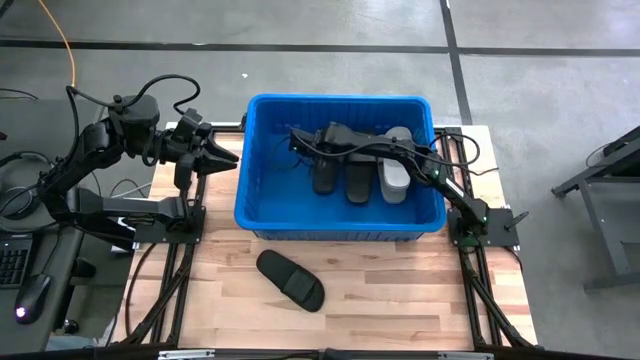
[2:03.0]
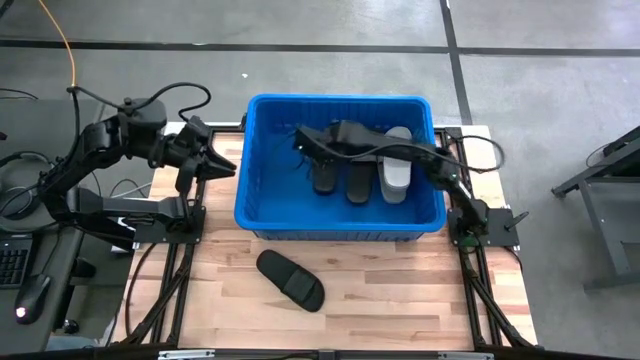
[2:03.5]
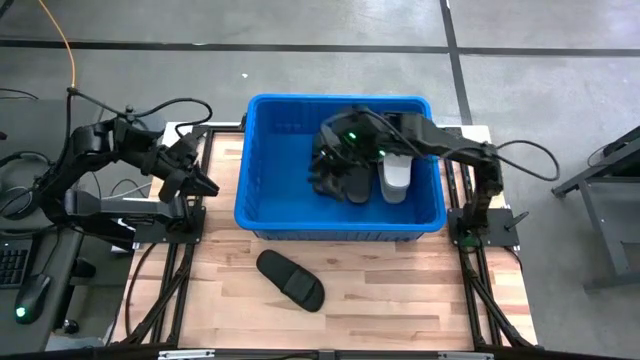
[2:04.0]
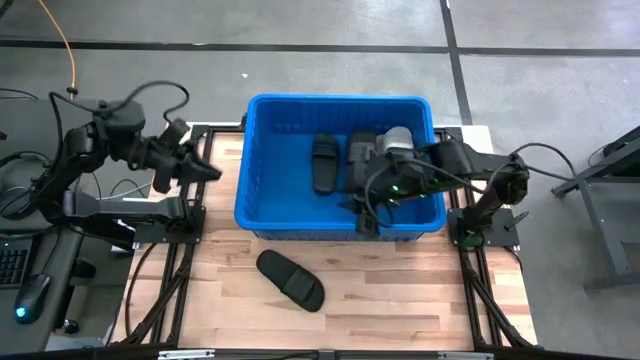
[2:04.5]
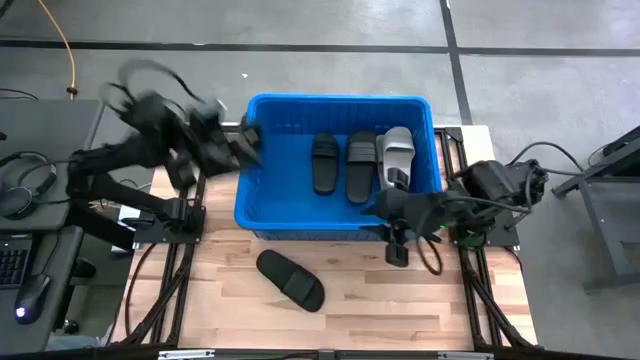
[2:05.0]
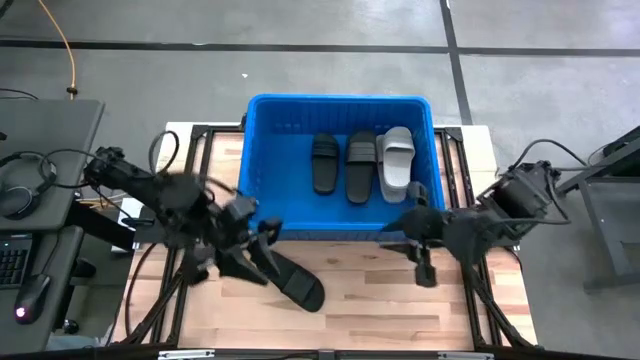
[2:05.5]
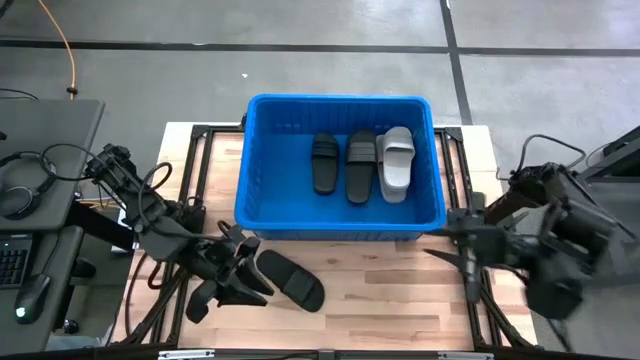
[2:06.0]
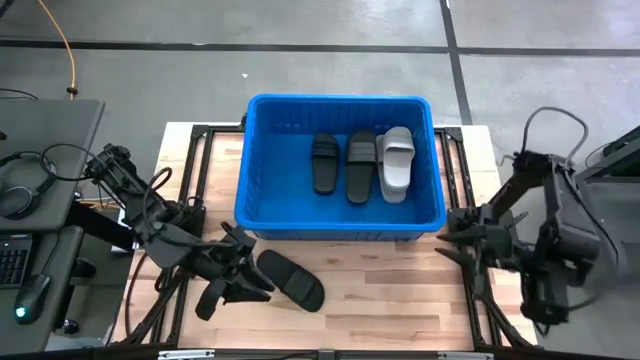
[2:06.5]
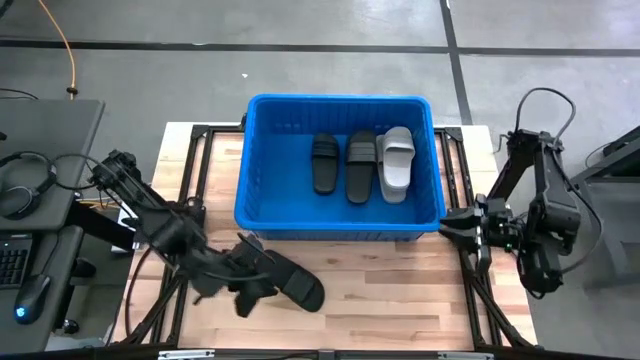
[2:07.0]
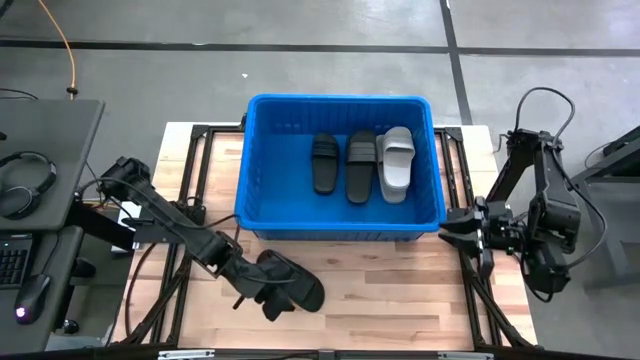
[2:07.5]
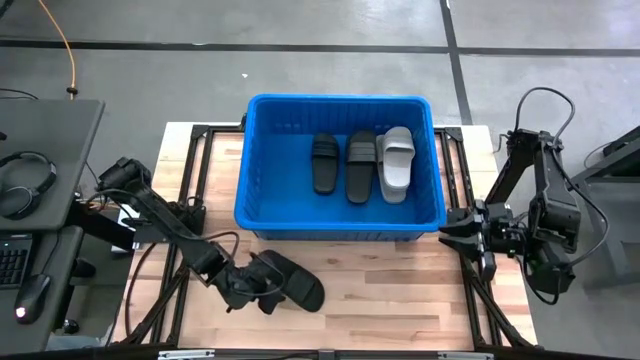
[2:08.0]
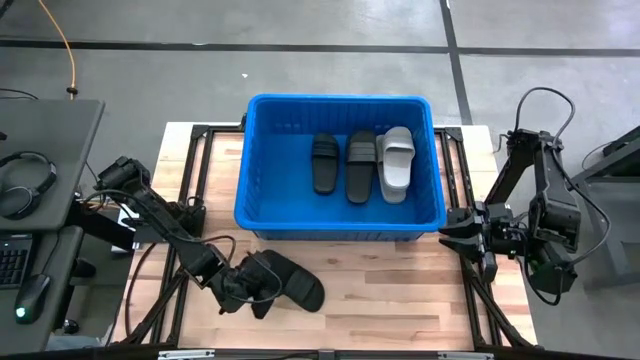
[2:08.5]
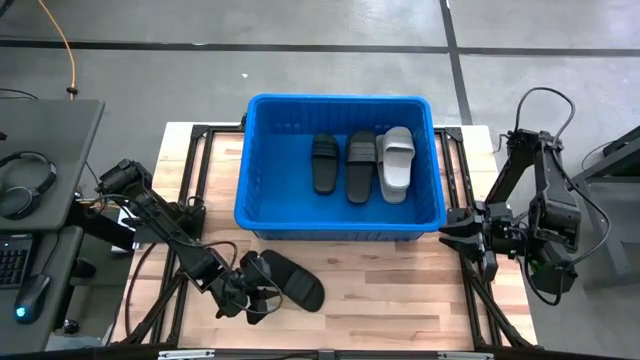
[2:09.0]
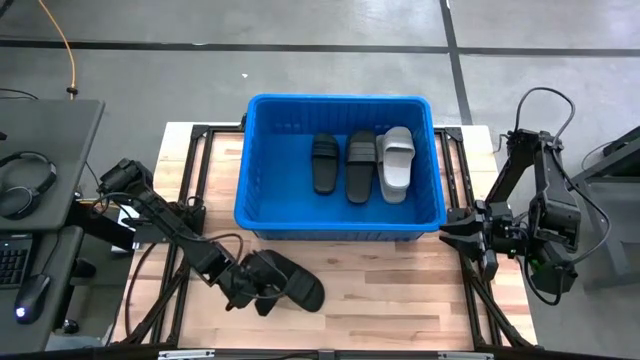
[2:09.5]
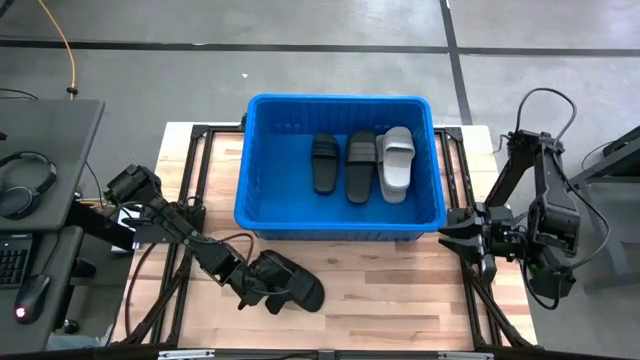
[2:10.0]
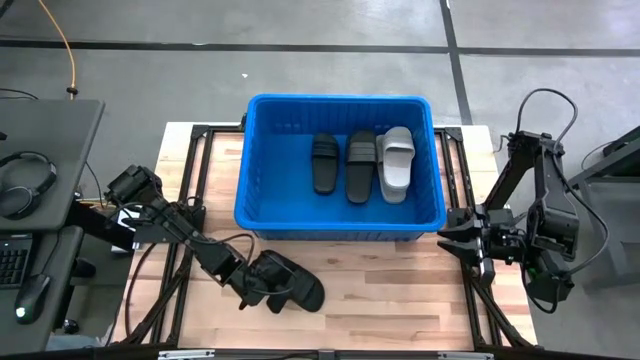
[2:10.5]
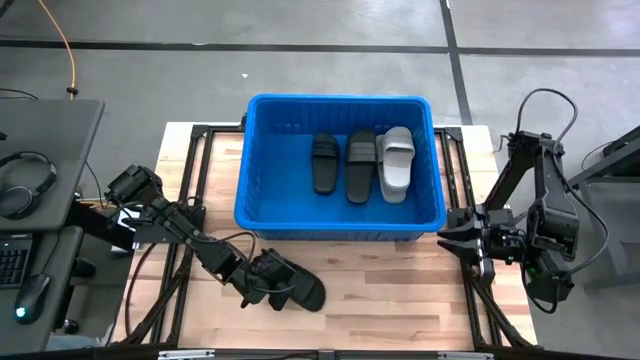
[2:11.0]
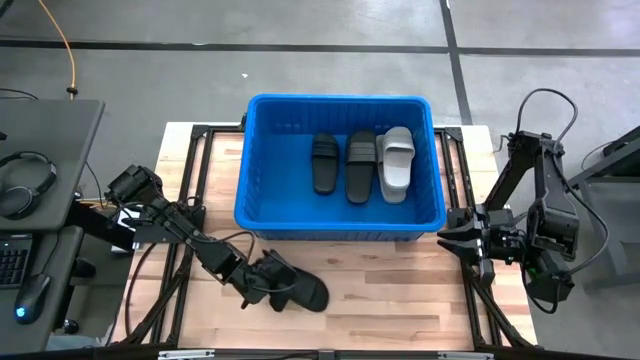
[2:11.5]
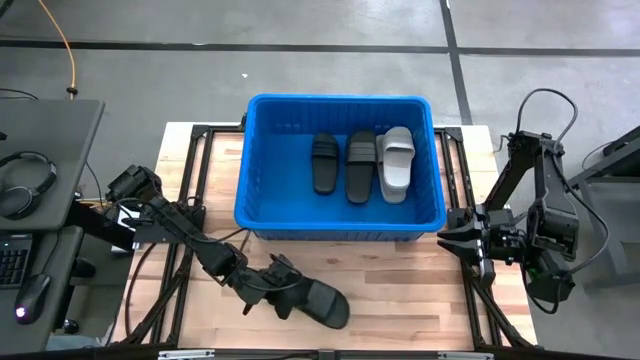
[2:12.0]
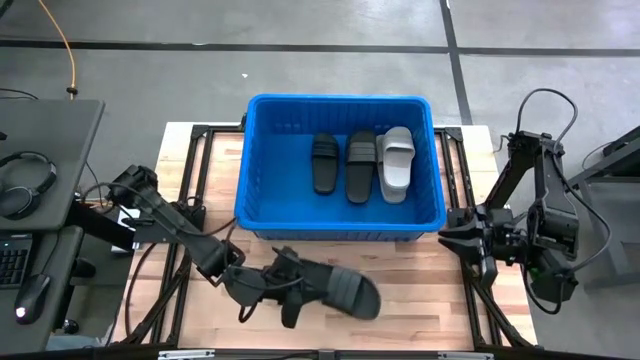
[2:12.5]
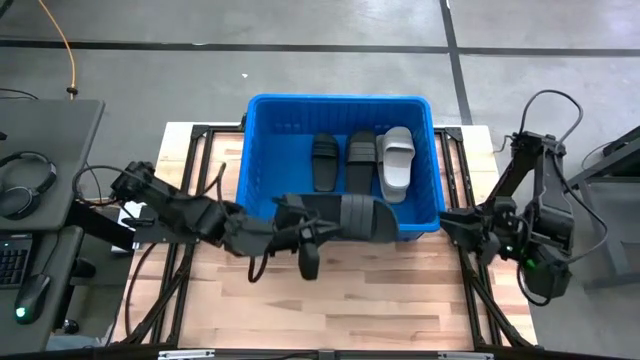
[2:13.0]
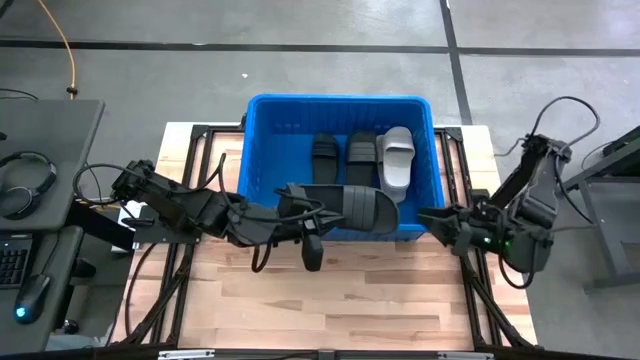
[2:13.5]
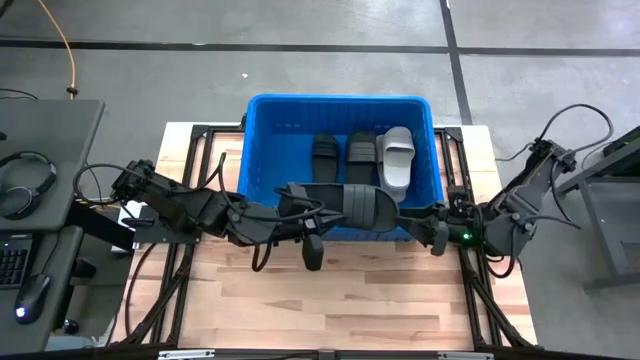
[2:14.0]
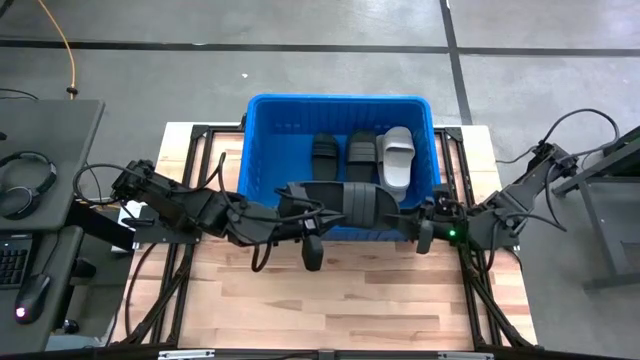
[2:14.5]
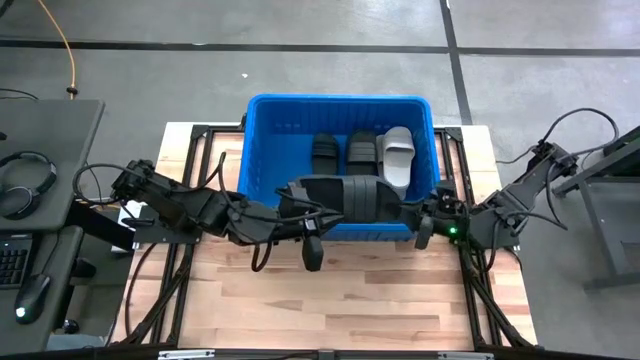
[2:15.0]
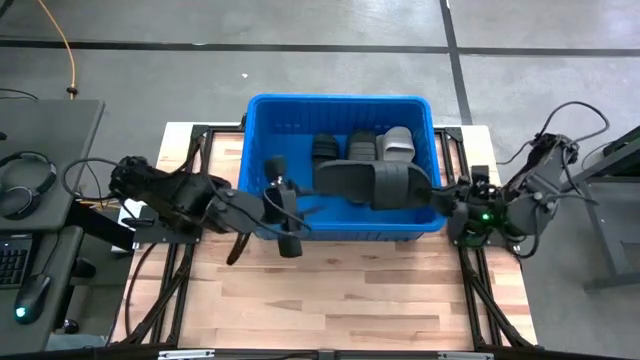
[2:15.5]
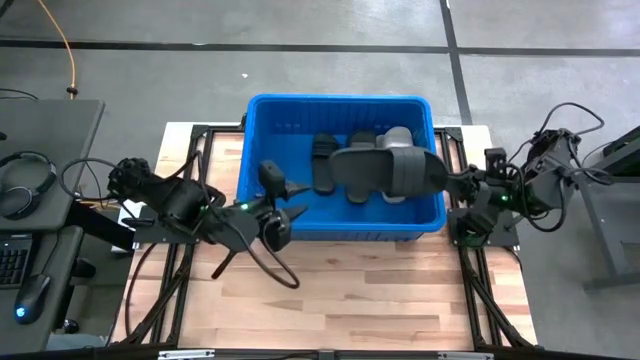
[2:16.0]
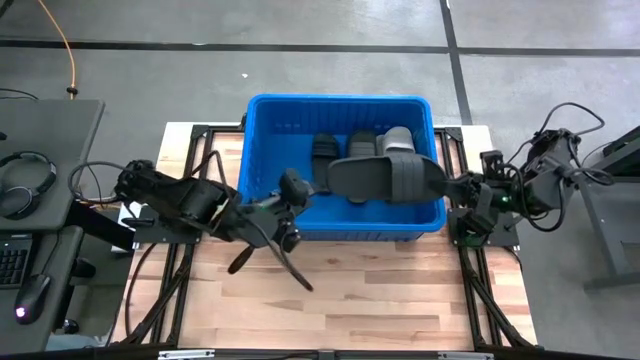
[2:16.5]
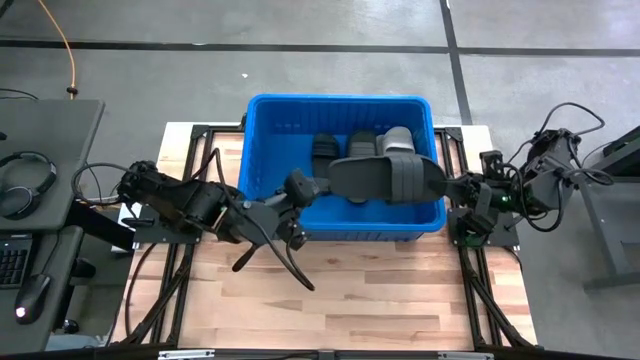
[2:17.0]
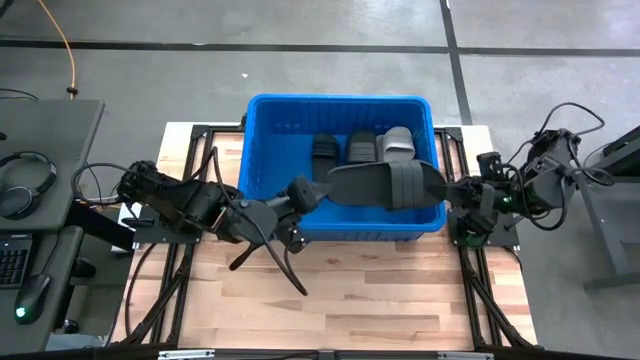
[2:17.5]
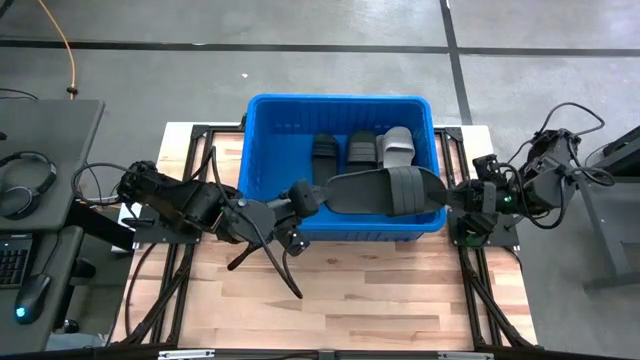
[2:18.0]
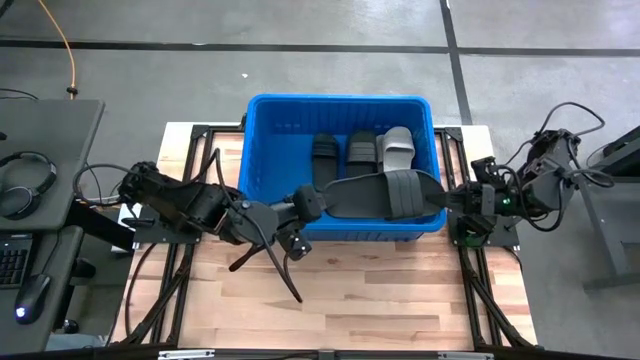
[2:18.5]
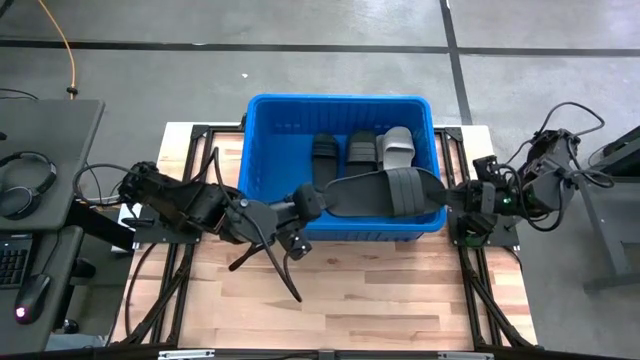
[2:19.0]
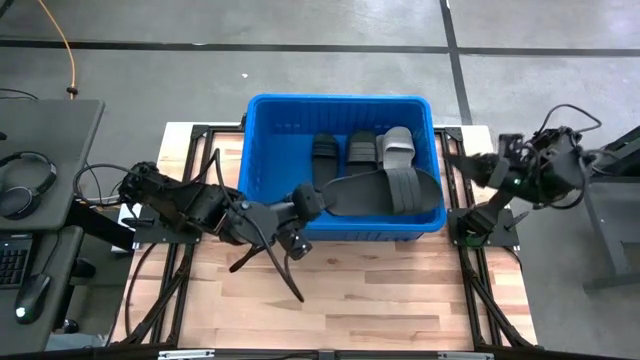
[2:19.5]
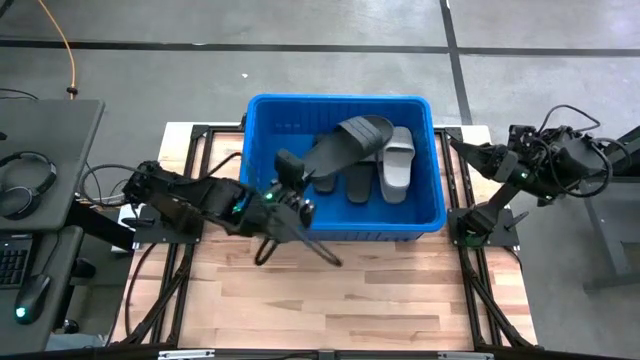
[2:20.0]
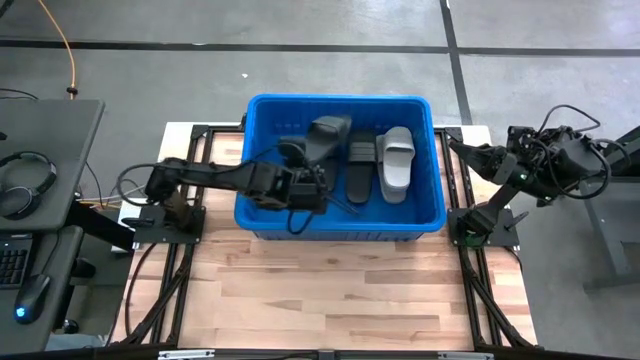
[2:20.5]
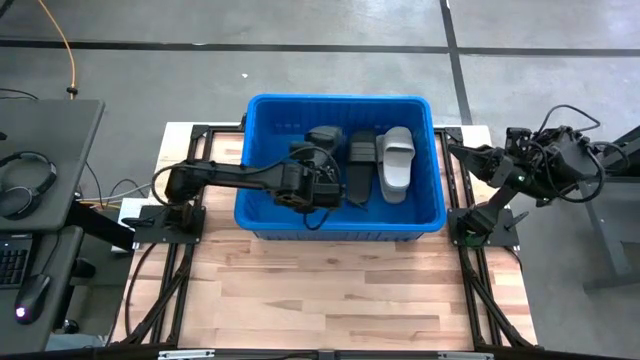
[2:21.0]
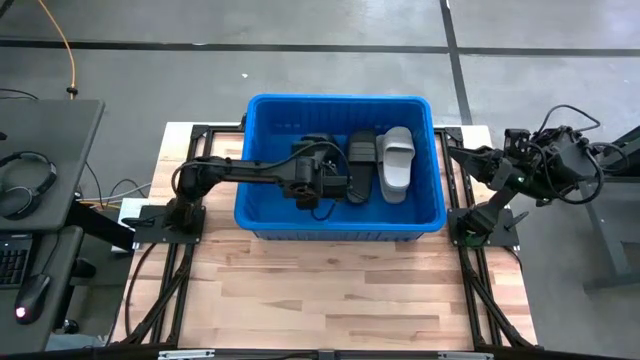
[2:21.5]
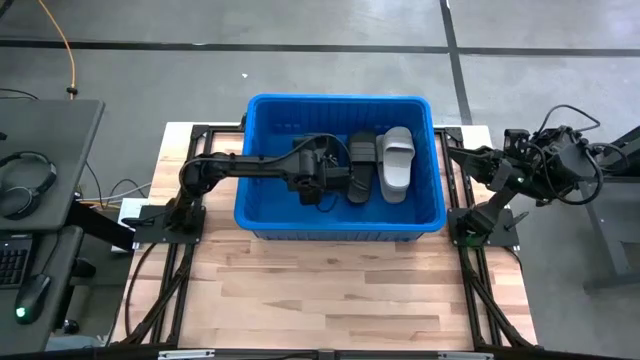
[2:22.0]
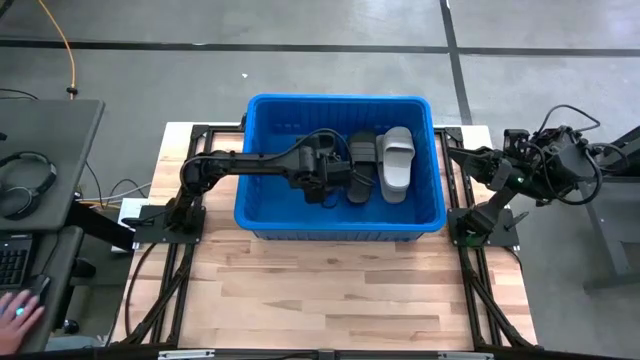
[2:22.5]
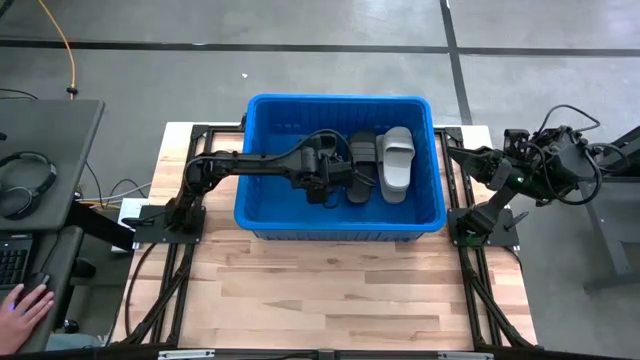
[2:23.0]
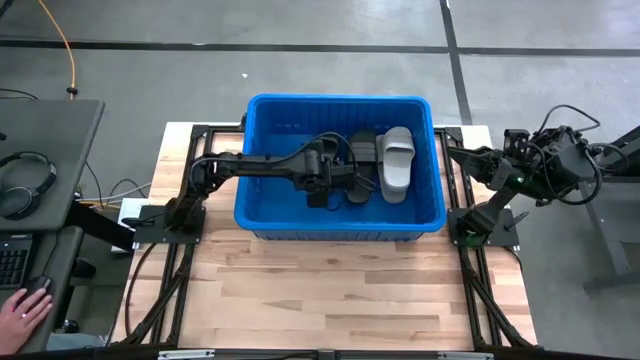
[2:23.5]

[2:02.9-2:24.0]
Task: Pick and place slides into bin
Put the black slide into the blue bin
